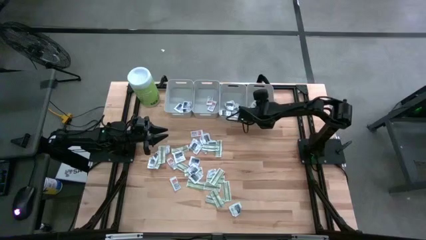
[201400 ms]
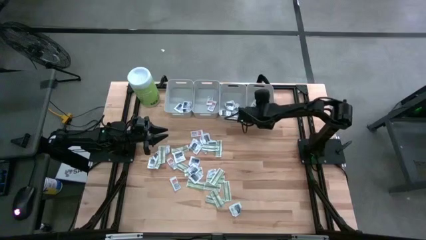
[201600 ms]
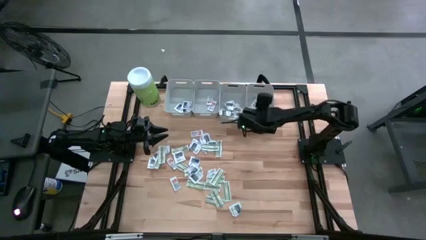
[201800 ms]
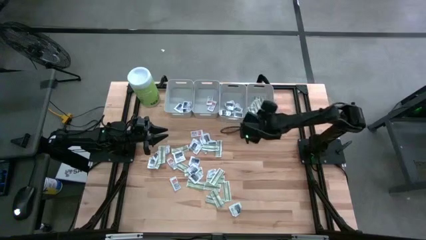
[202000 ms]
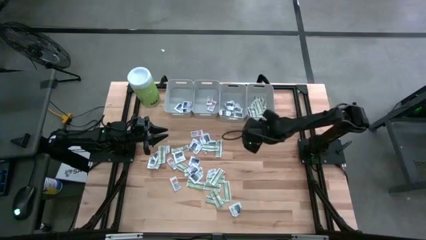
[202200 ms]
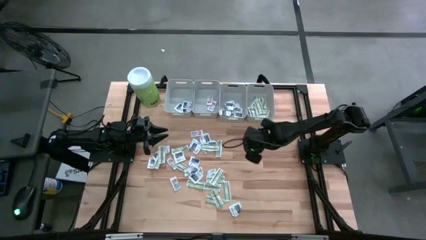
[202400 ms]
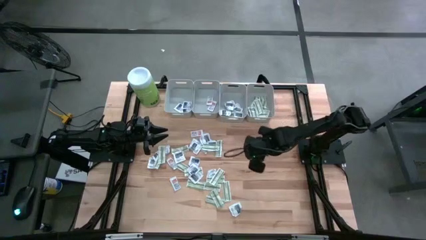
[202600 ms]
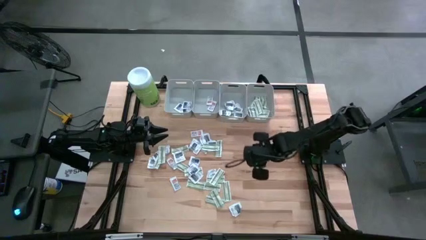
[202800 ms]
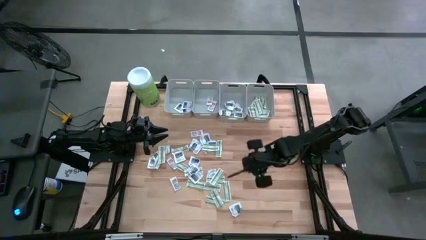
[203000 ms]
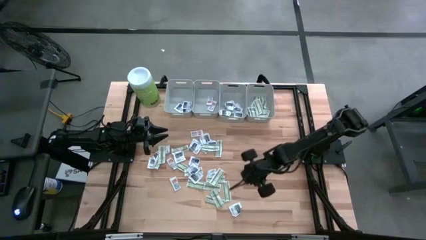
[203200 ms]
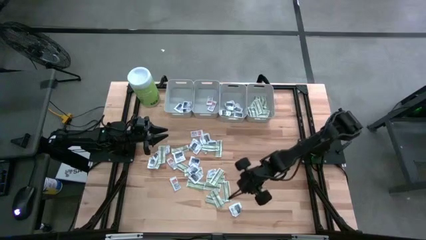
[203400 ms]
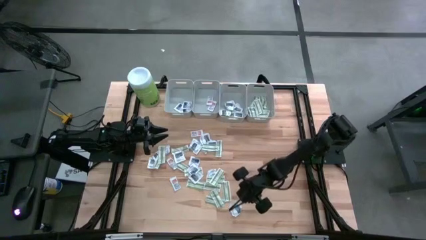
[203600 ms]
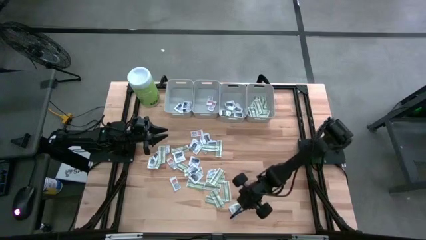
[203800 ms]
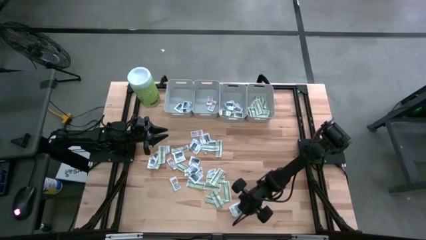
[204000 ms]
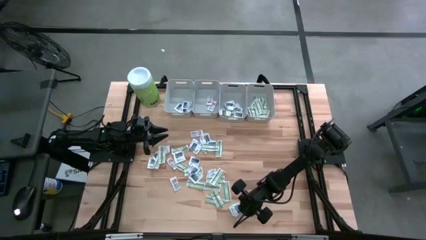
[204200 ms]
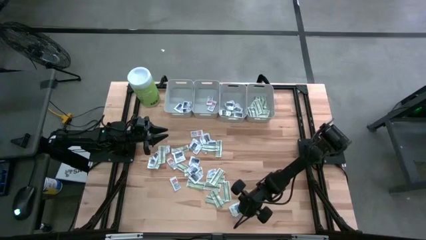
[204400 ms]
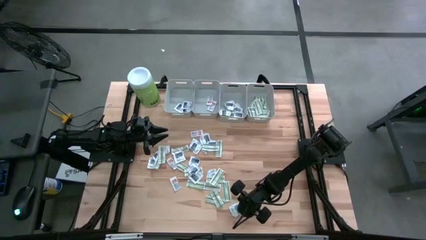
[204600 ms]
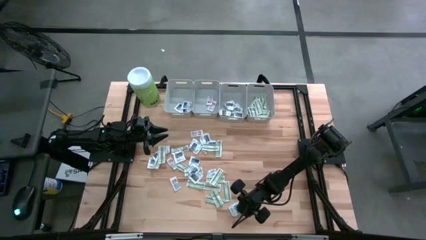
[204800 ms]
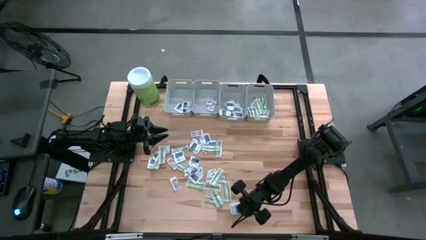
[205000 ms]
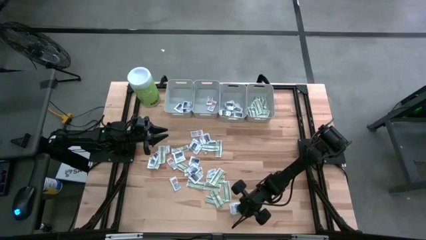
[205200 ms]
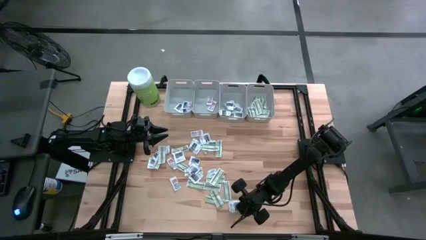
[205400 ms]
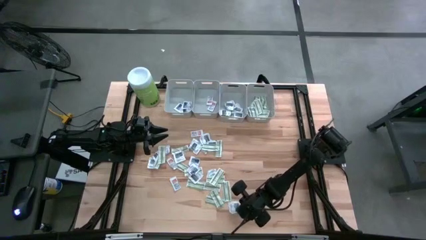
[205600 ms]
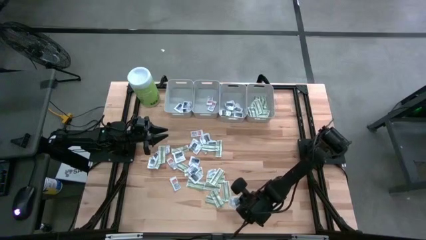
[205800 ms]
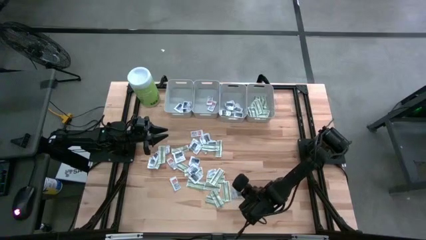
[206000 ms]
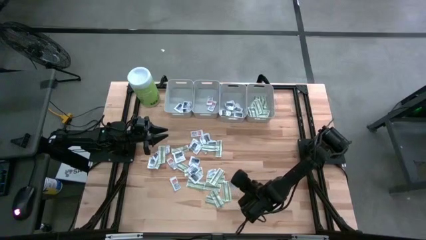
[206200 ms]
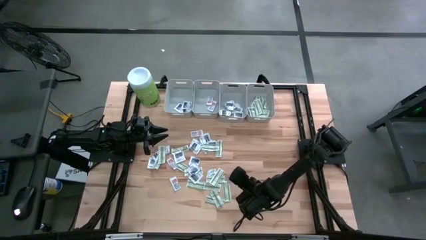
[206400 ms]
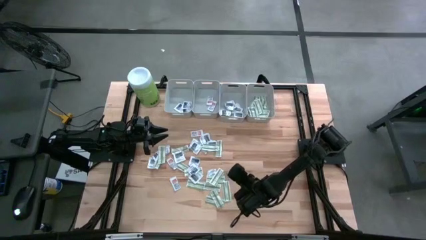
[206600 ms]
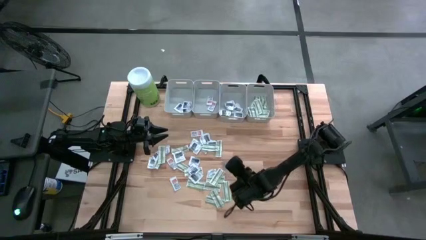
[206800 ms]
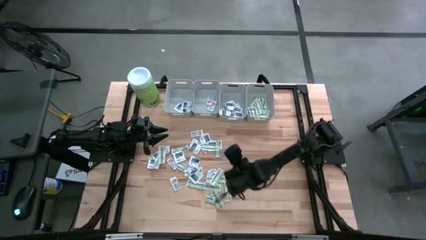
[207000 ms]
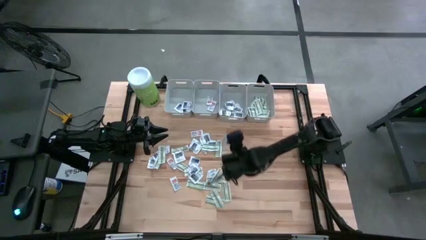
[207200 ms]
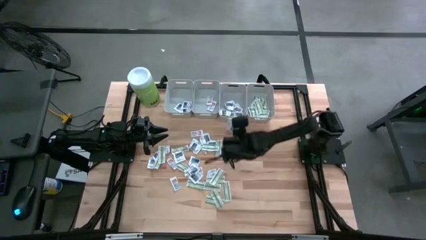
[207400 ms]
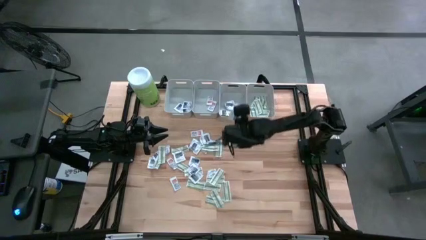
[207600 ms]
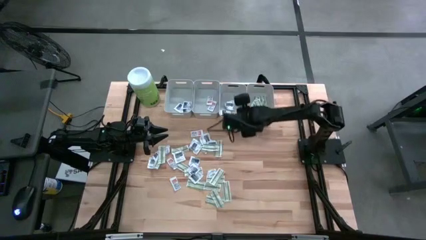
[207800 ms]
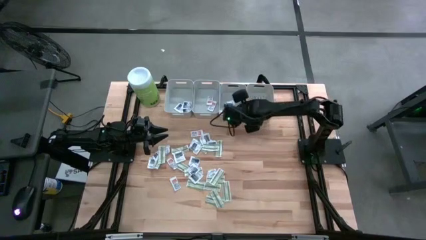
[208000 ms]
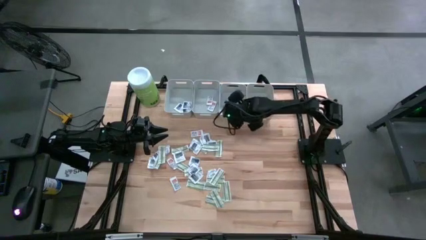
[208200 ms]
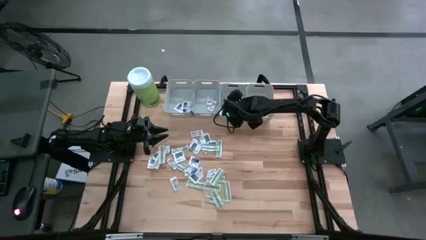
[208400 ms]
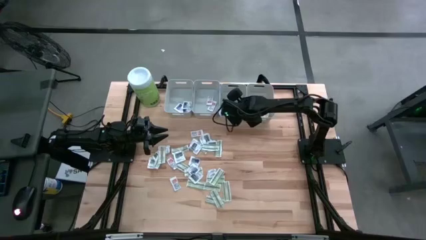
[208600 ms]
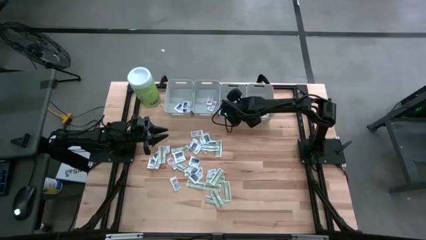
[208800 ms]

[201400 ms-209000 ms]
Task: Pick & Place First Aid Supplies
Put the towelette pack into the middle right gray bin

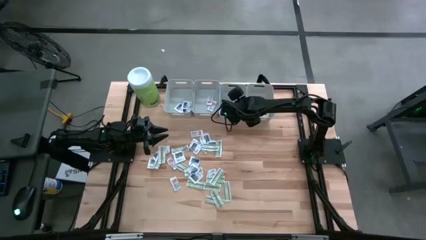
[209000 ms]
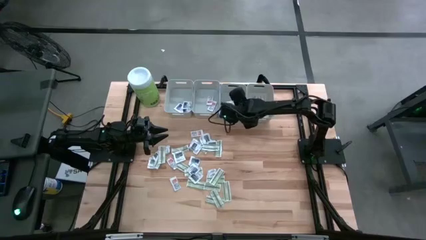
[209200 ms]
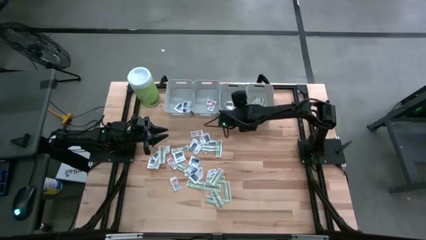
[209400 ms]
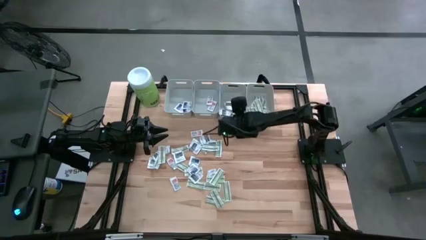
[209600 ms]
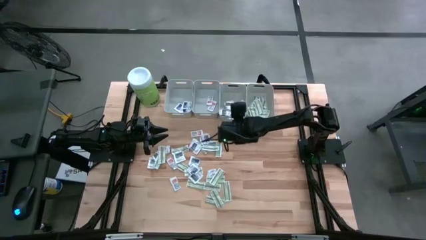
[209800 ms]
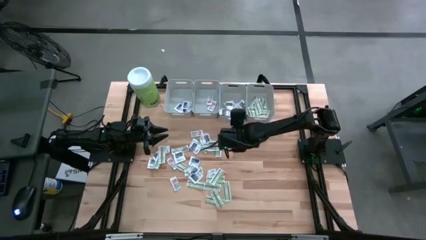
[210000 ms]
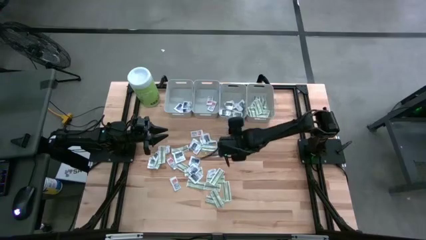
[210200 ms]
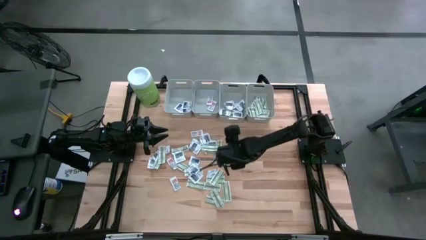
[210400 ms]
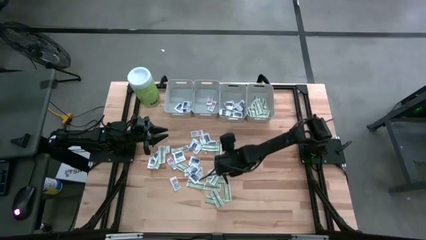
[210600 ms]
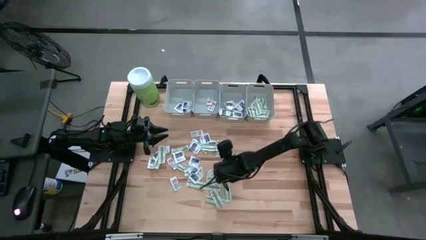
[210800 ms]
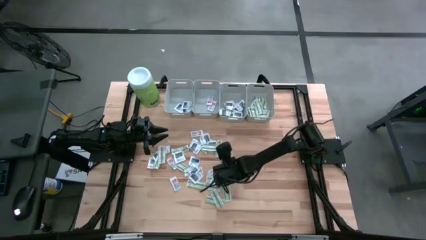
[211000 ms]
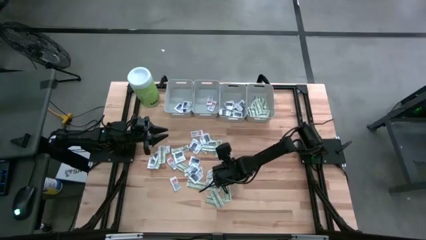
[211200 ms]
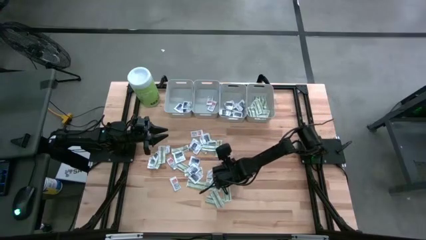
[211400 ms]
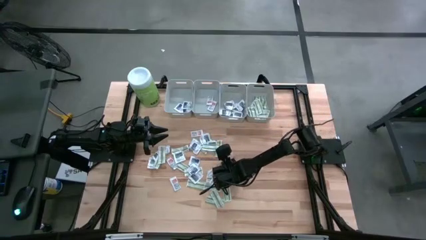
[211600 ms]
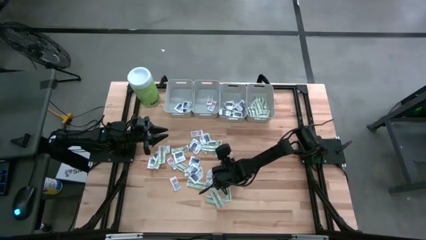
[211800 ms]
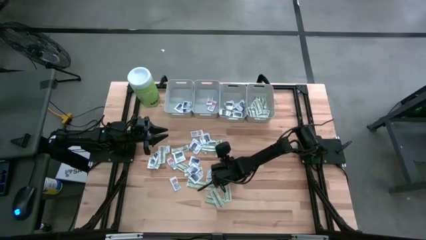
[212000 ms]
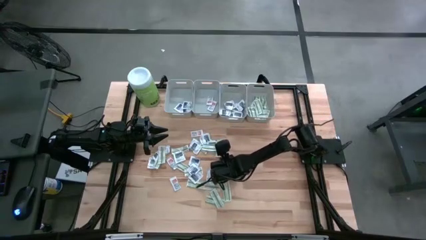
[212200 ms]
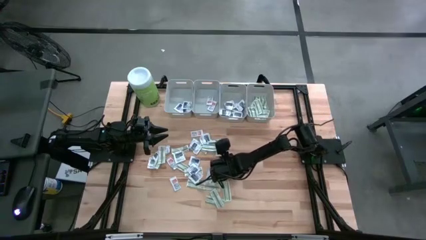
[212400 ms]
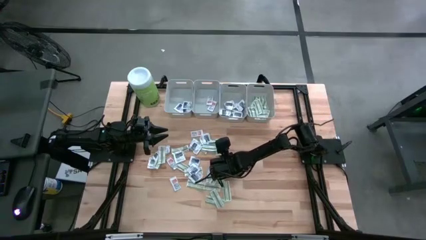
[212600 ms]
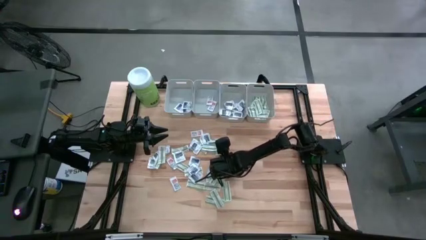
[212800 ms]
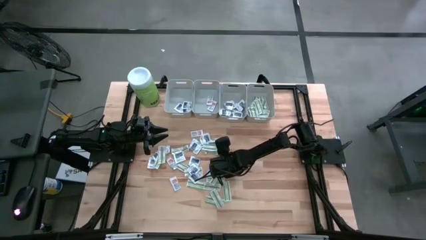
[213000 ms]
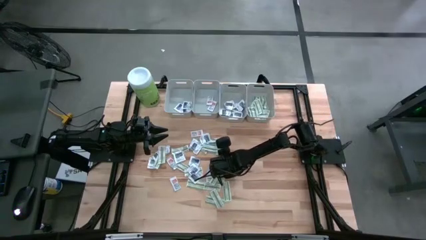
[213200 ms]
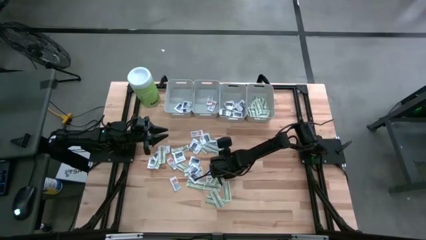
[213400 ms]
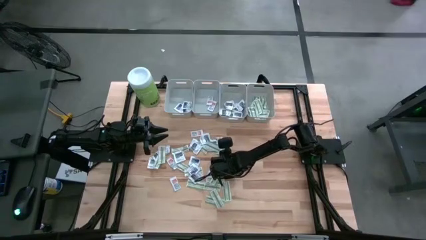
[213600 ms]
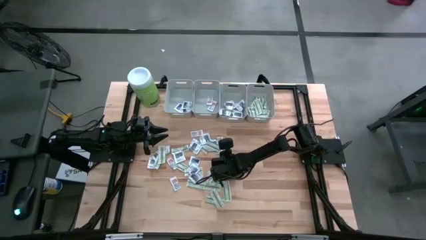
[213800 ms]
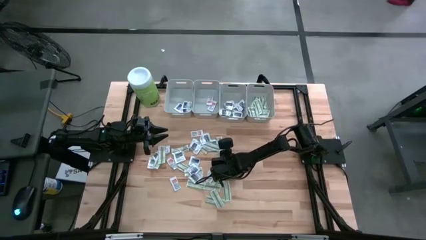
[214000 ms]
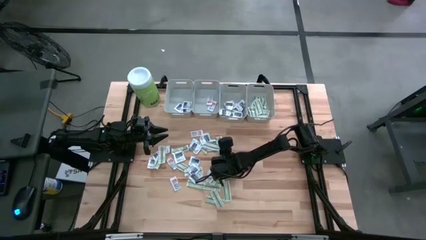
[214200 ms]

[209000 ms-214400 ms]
Put the bandage into the right gray bin

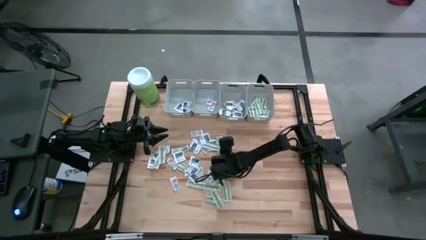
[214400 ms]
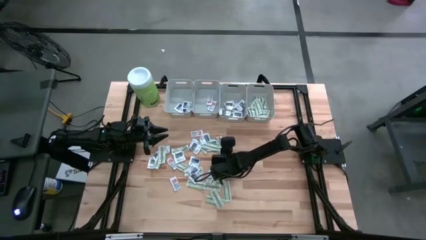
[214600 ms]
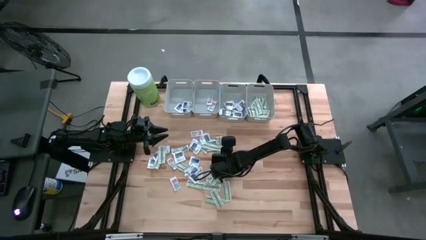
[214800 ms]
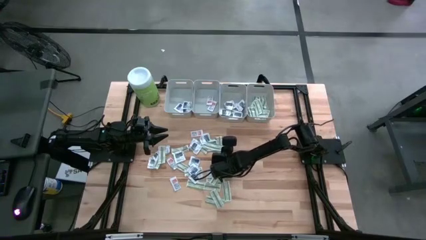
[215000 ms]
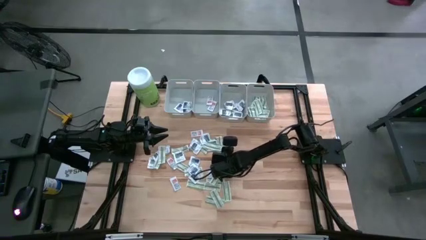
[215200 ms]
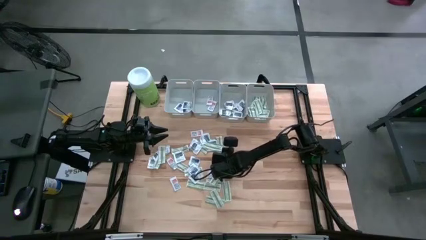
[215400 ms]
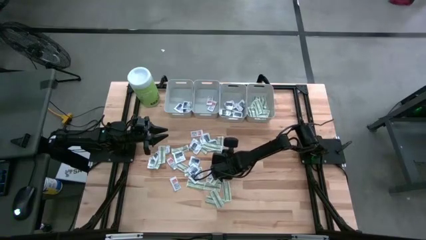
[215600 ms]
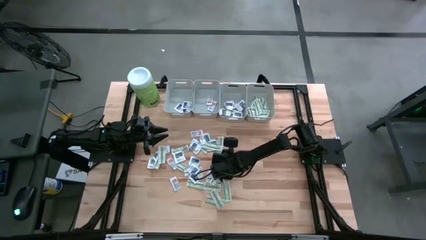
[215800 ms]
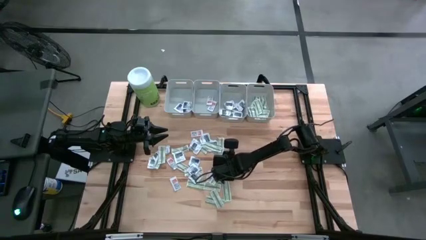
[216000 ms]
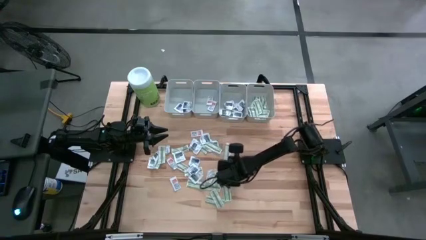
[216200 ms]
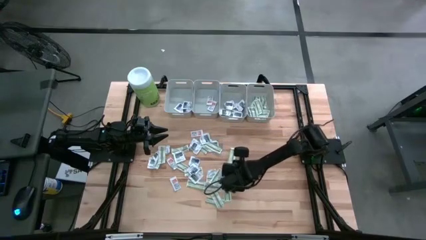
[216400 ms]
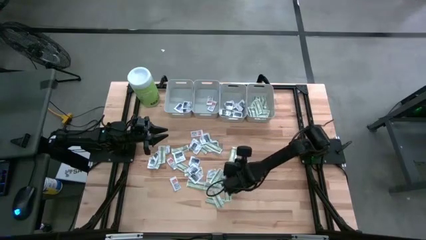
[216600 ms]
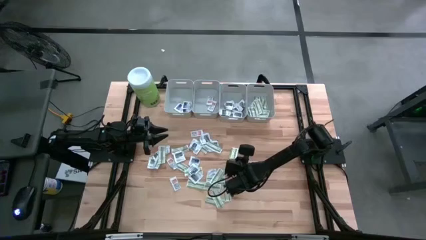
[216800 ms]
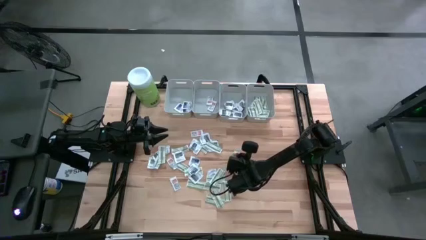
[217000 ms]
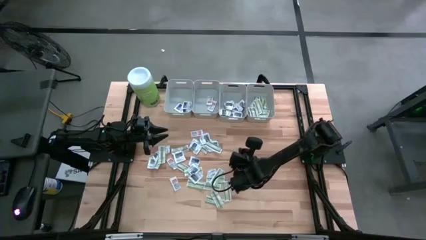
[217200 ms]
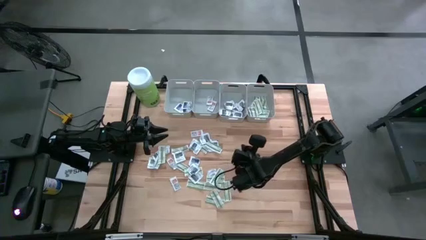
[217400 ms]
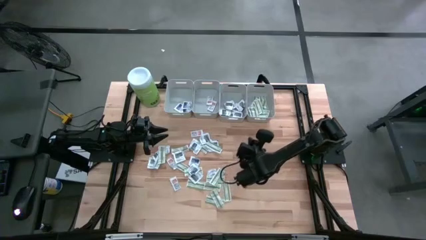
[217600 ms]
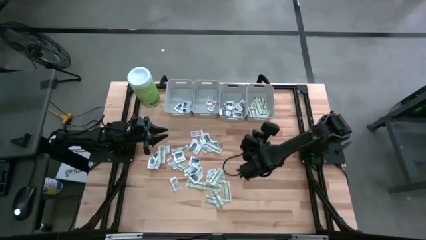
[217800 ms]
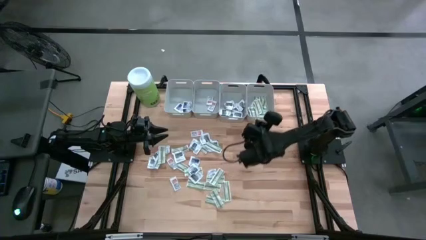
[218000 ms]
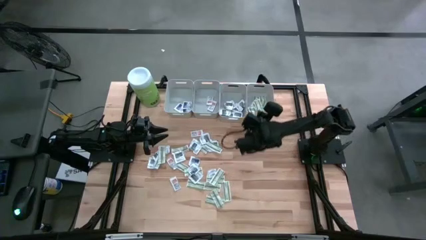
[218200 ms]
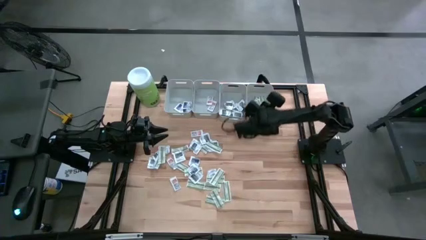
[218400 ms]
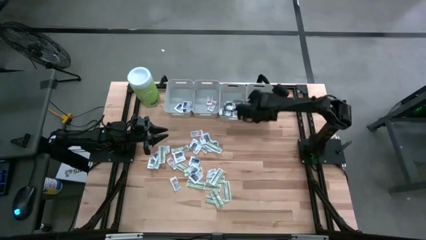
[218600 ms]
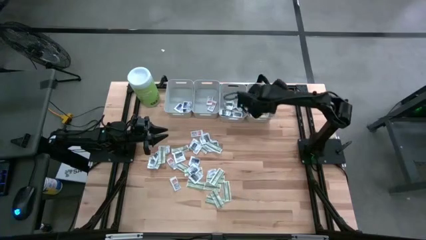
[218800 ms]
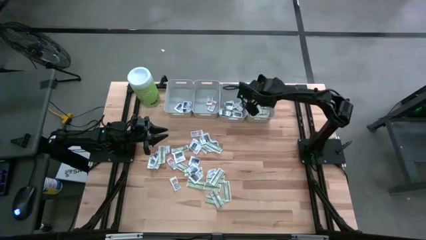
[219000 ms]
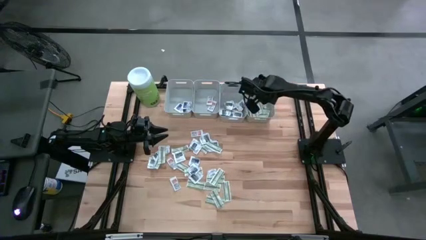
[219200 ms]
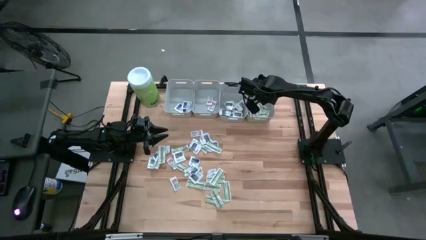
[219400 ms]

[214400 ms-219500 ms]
Put the bandage into the right gray bin
